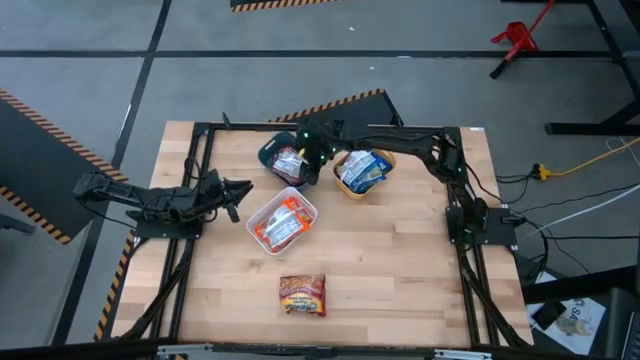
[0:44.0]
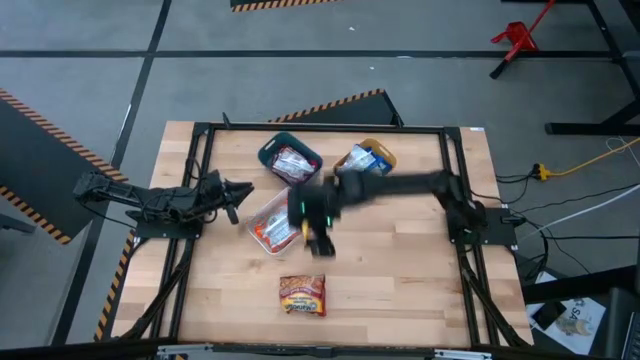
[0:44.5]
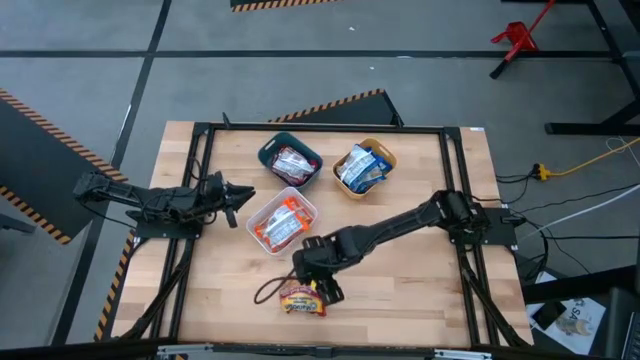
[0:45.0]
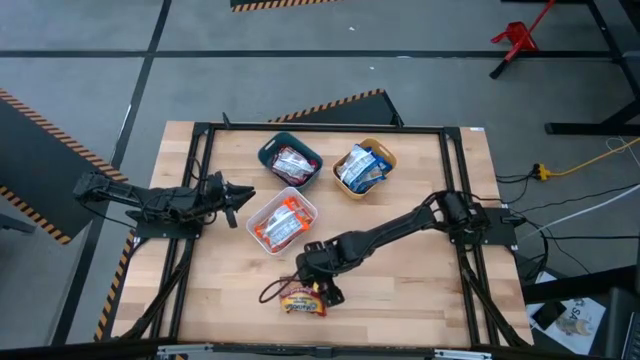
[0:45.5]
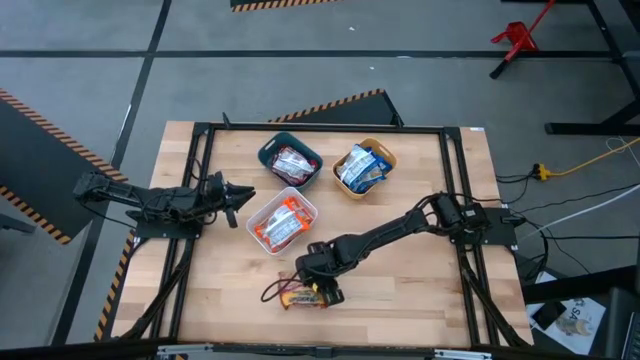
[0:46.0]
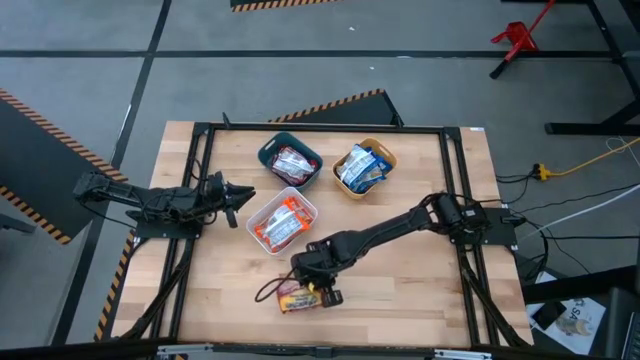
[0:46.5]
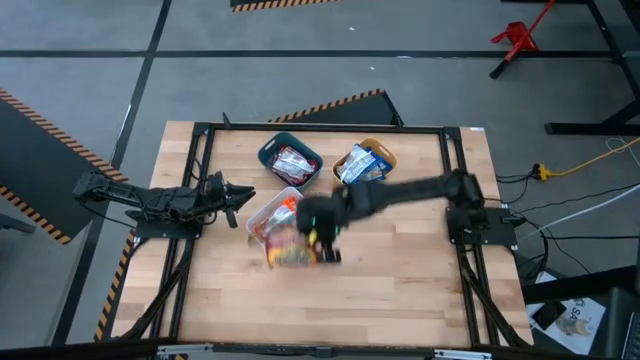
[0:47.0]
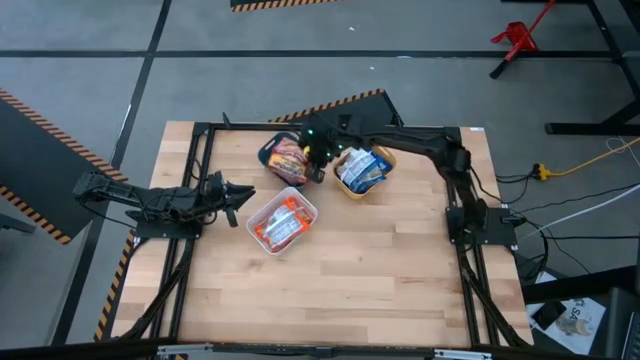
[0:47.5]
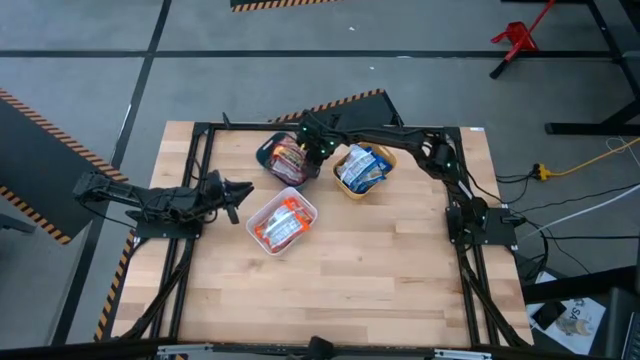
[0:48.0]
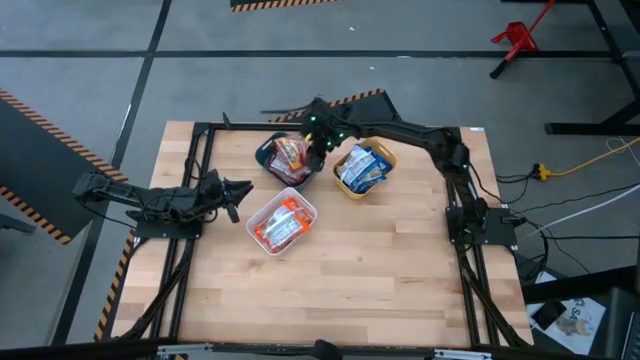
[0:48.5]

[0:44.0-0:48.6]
Task: Sort Maruchan noodles
Put the red noodle pack into the blue bin

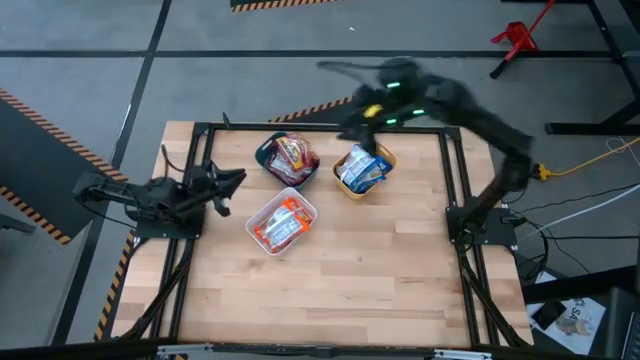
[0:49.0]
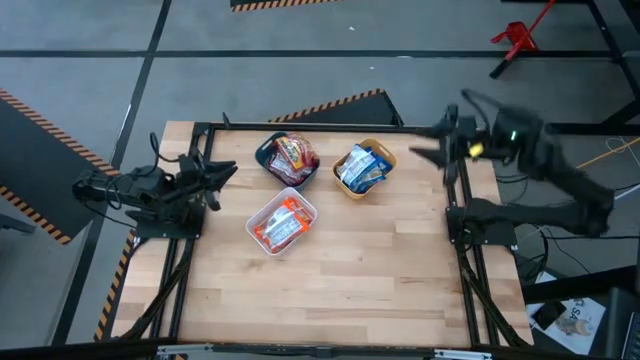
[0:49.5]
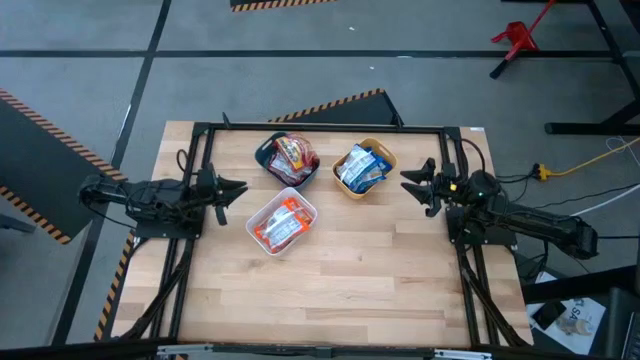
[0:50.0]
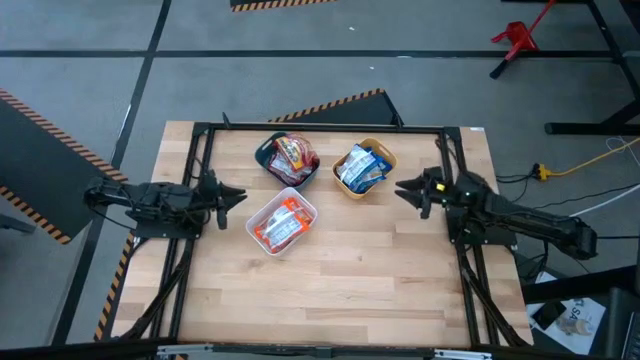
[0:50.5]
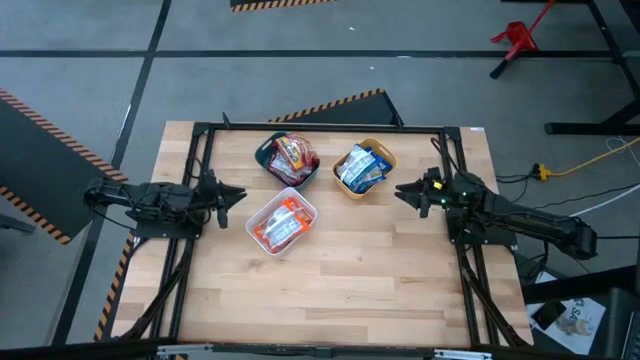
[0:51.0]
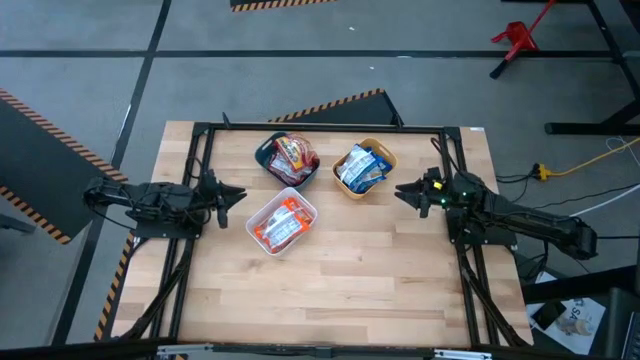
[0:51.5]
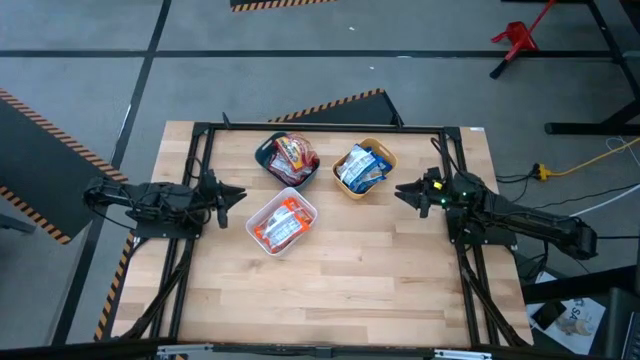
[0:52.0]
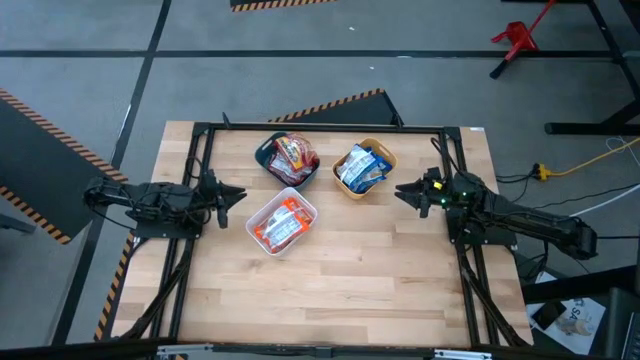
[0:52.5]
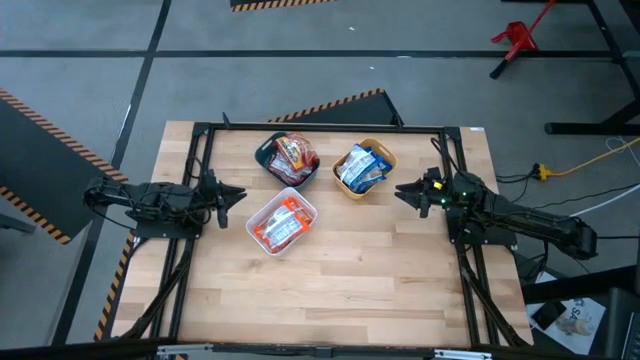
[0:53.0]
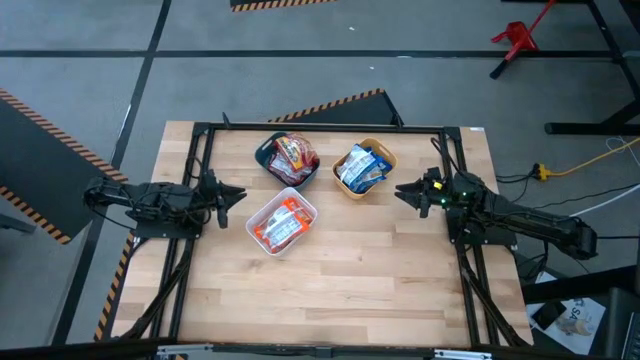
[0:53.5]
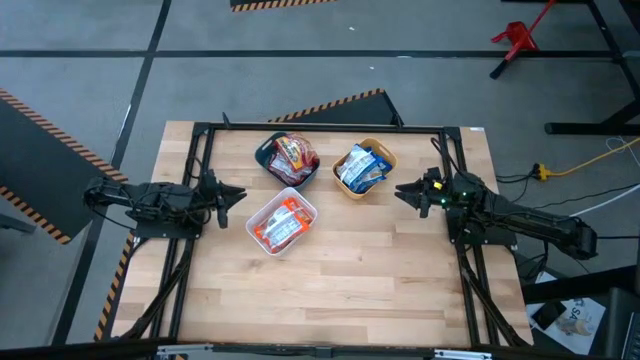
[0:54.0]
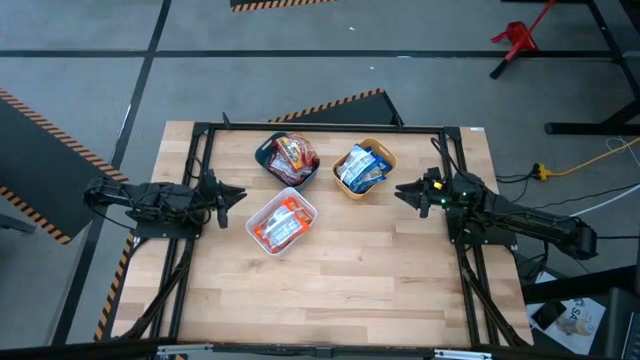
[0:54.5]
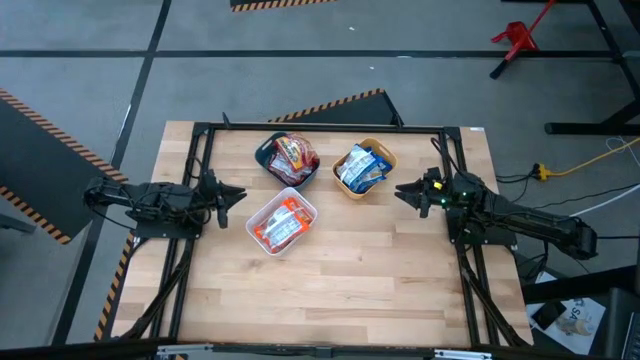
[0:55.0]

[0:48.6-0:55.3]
Return to Home Position

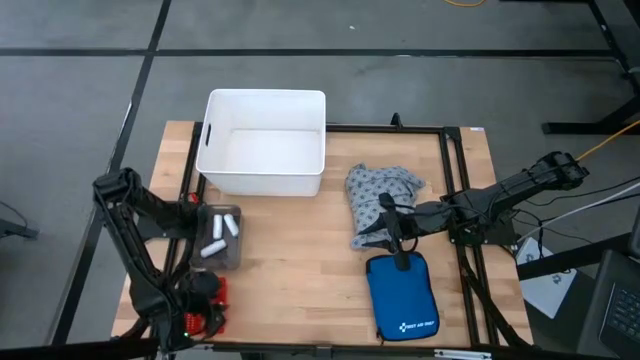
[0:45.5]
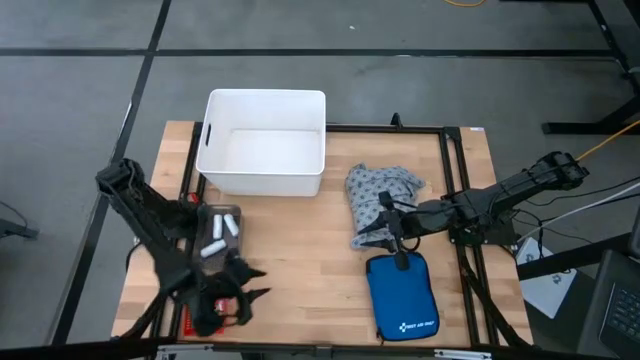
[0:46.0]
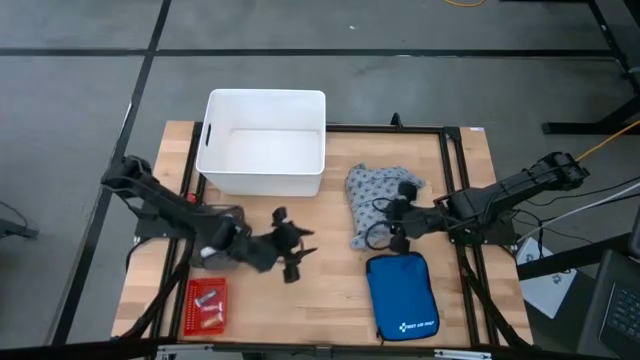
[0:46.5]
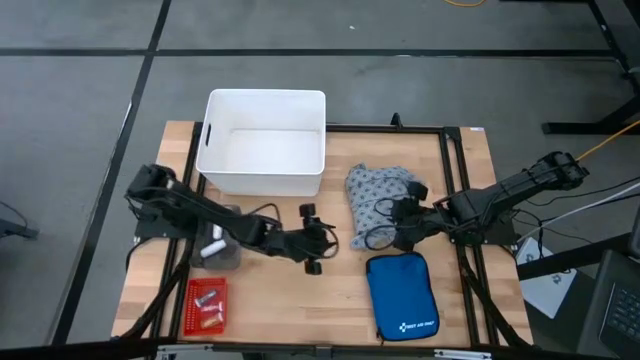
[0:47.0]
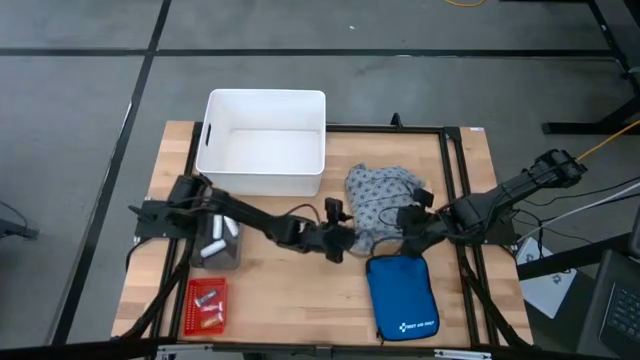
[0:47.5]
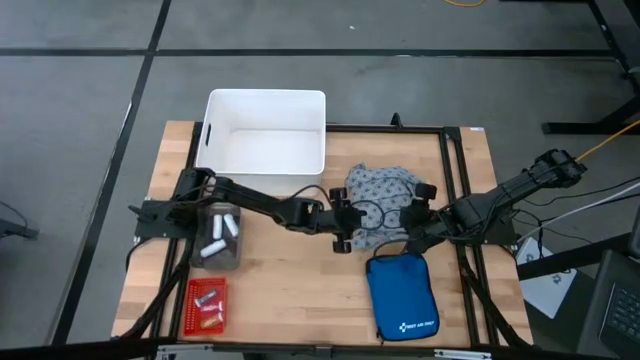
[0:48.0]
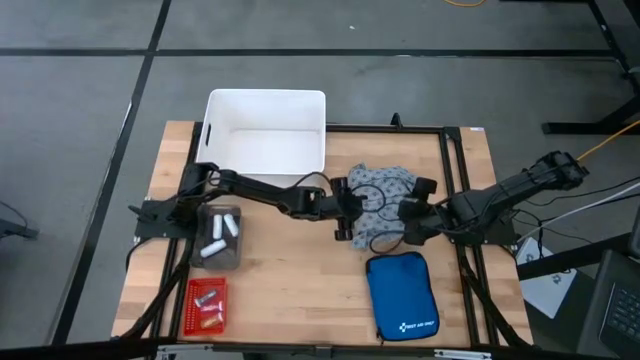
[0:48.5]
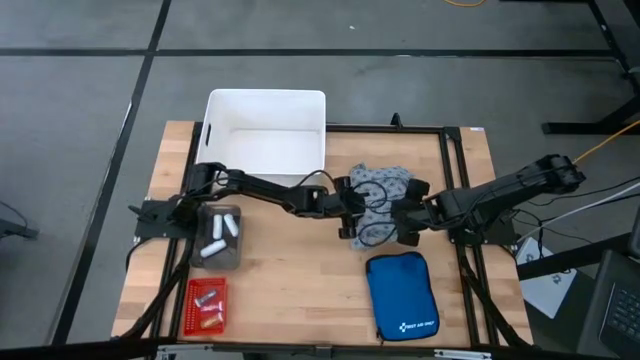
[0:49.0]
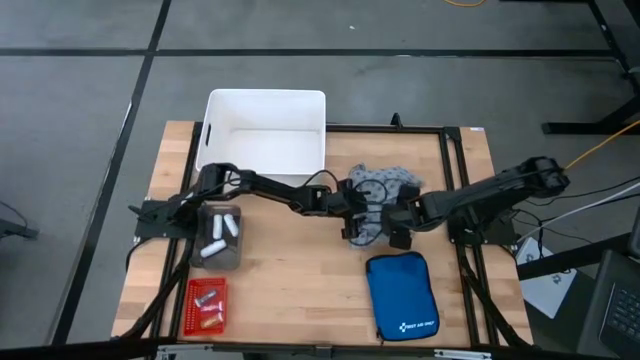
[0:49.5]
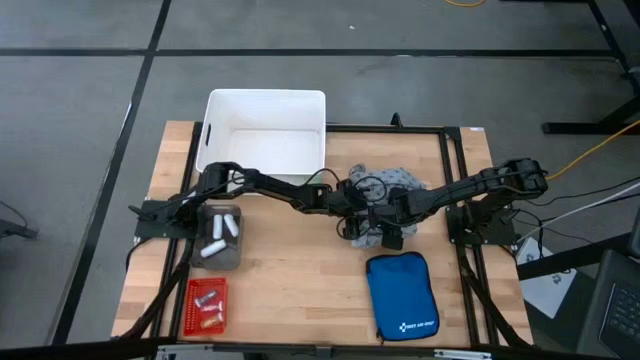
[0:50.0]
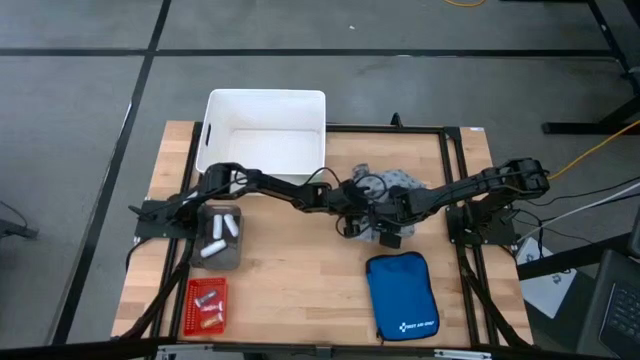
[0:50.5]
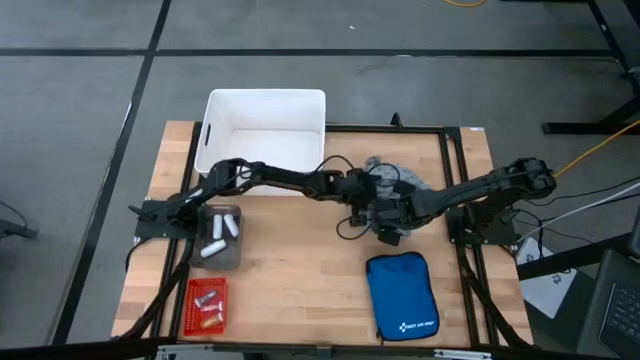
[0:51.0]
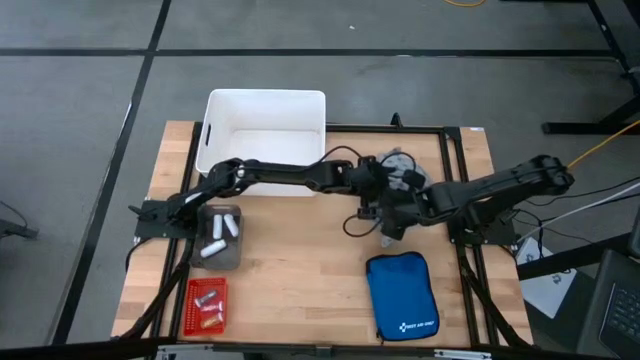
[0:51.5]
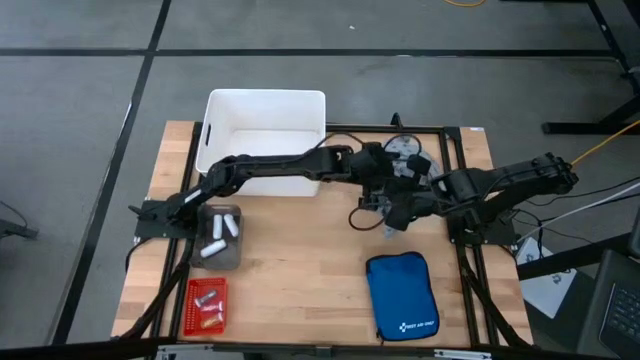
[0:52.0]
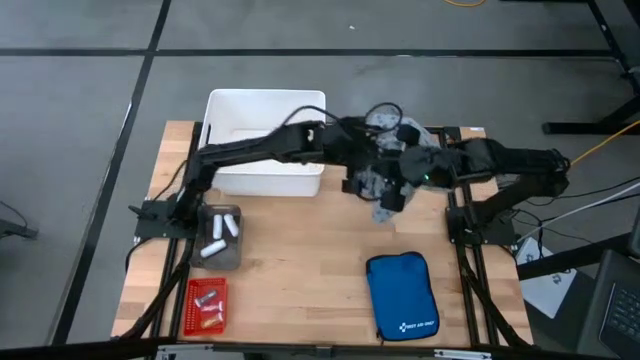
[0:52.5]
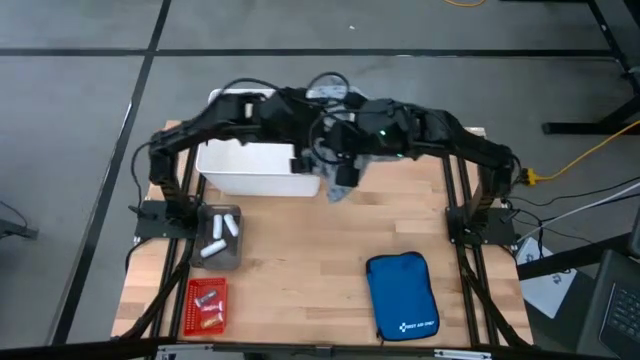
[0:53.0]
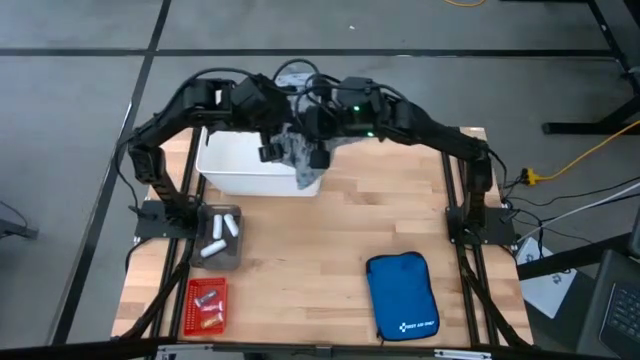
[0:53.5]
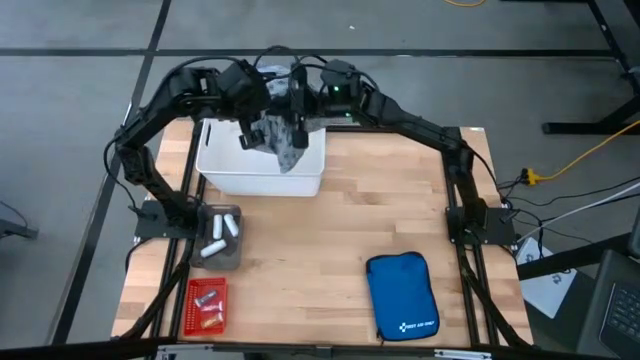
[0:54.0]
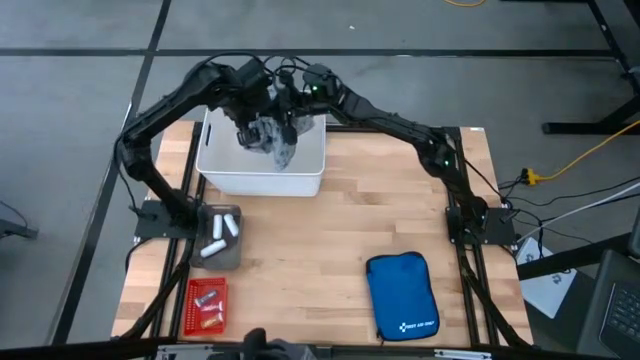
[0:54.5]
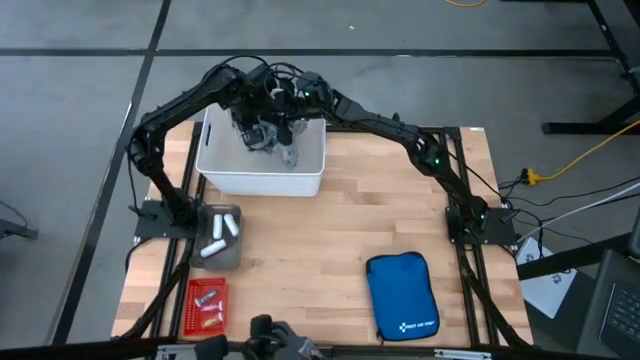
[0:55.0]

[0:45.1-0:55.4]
Task: Pick & place medical supplies in basket/bin
Put the light blue patient gown into the white bin
